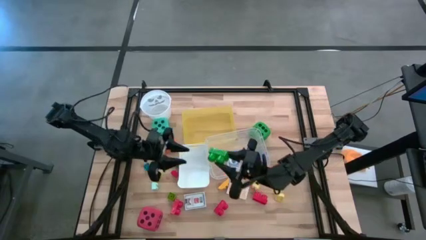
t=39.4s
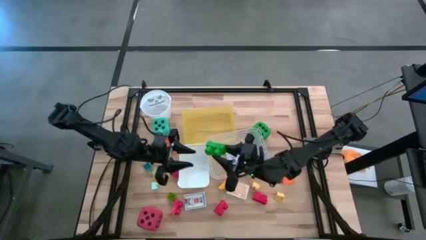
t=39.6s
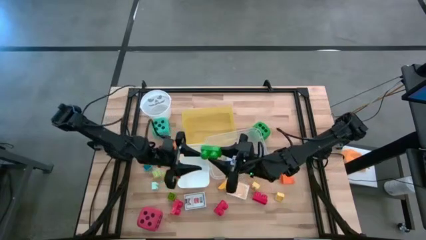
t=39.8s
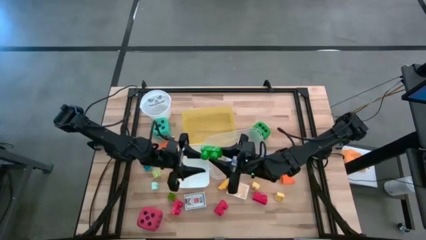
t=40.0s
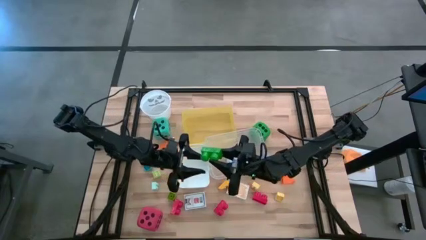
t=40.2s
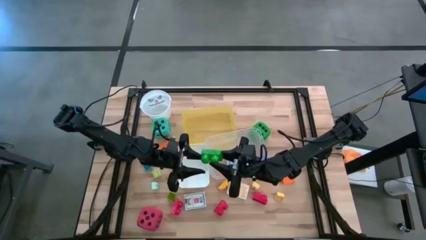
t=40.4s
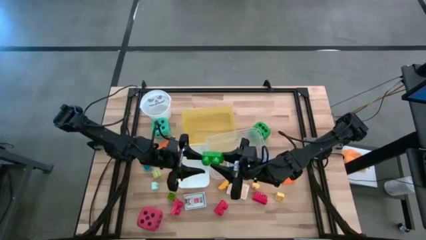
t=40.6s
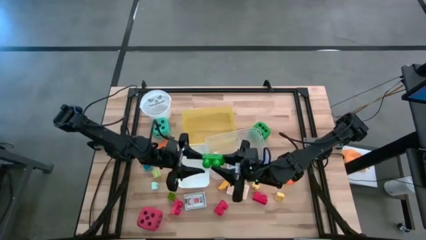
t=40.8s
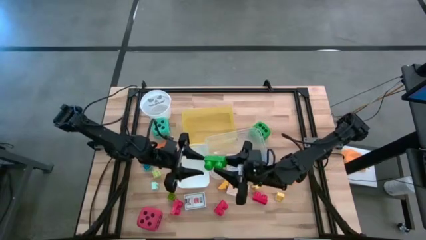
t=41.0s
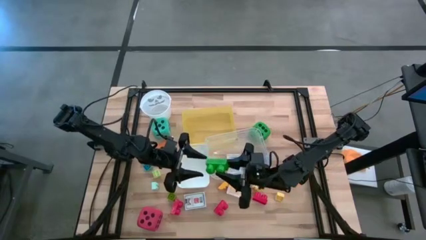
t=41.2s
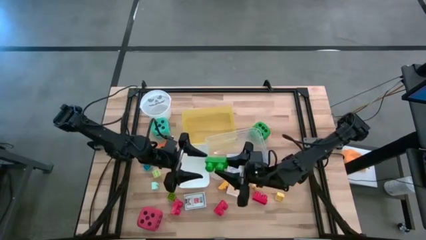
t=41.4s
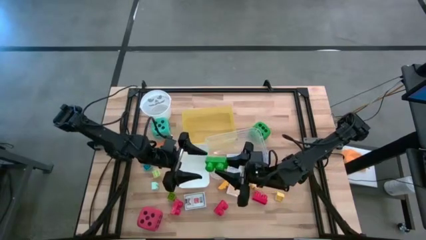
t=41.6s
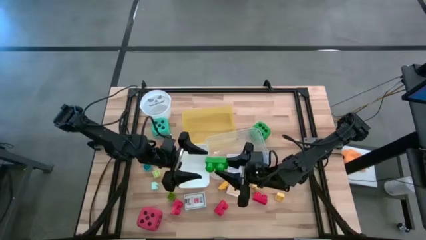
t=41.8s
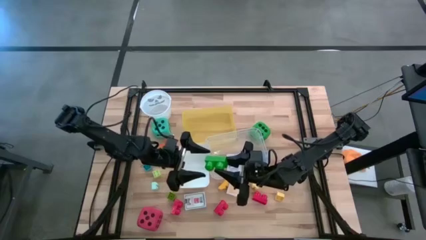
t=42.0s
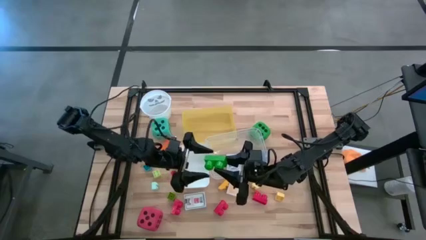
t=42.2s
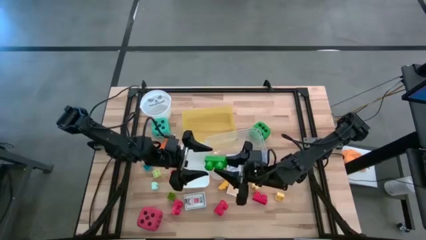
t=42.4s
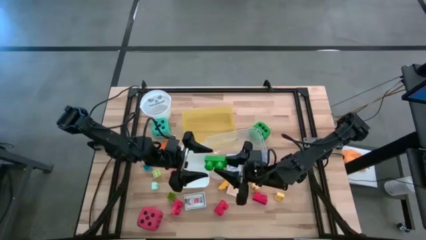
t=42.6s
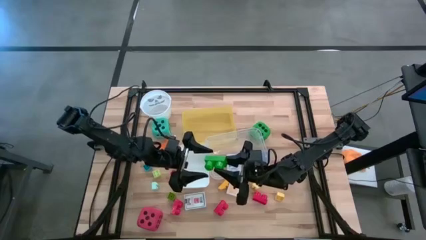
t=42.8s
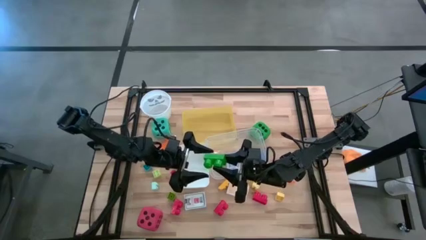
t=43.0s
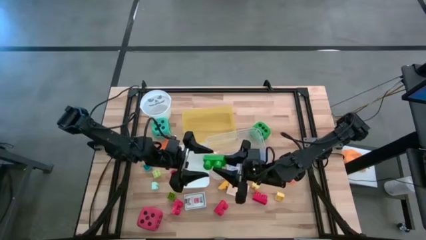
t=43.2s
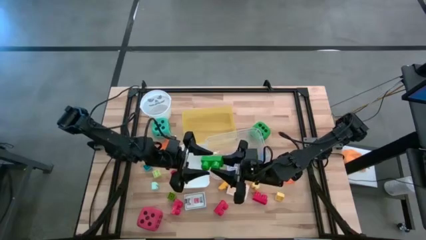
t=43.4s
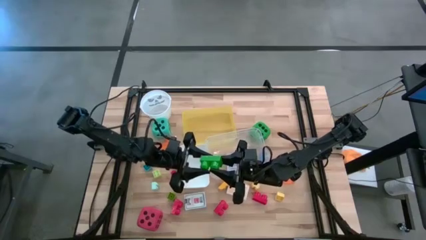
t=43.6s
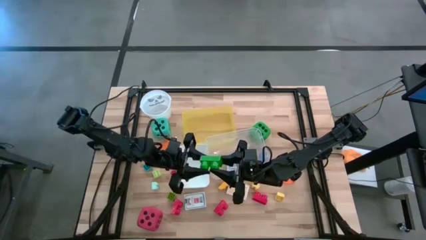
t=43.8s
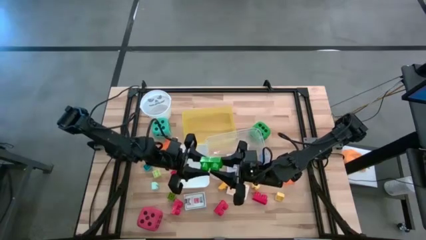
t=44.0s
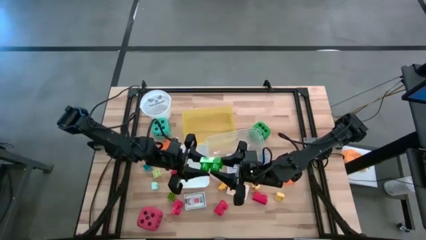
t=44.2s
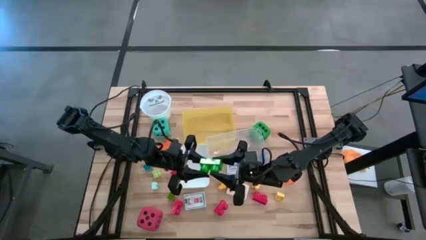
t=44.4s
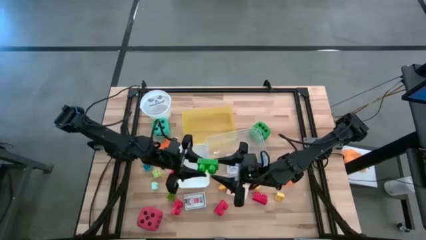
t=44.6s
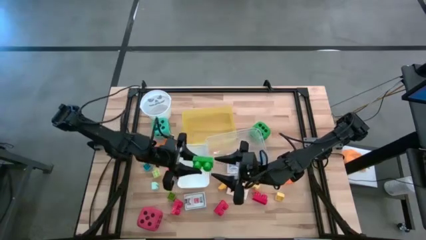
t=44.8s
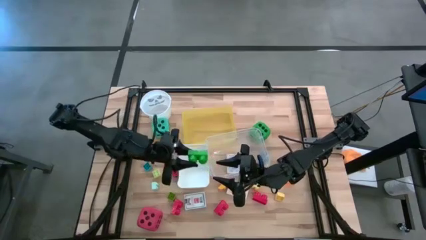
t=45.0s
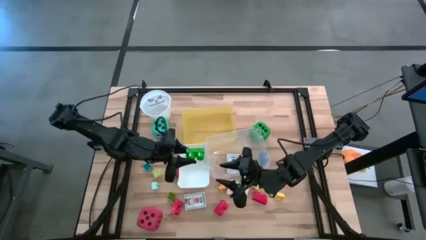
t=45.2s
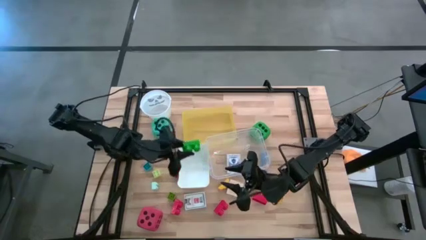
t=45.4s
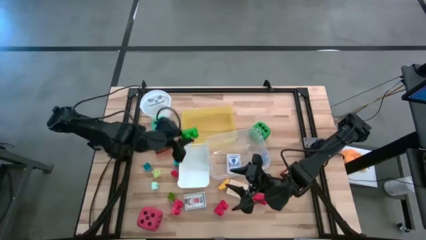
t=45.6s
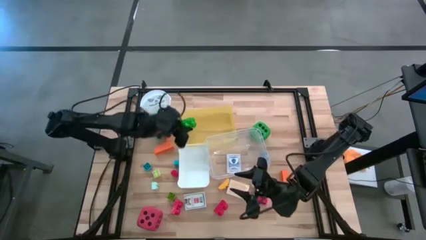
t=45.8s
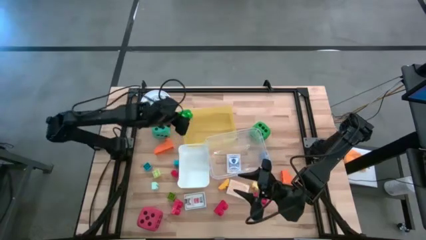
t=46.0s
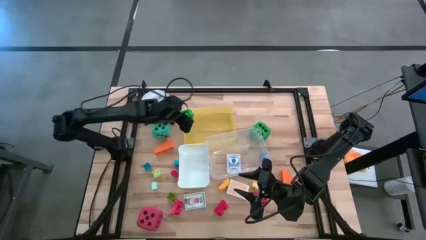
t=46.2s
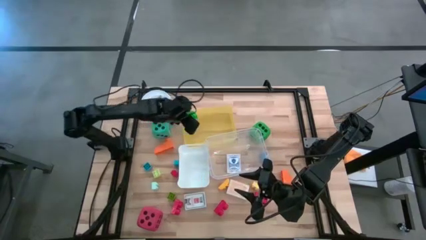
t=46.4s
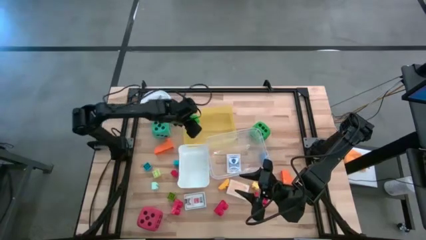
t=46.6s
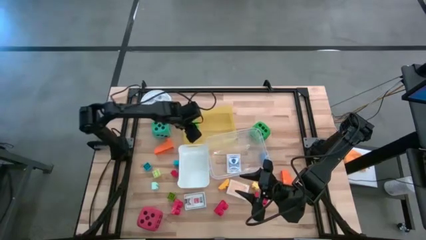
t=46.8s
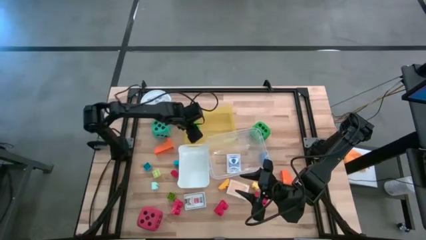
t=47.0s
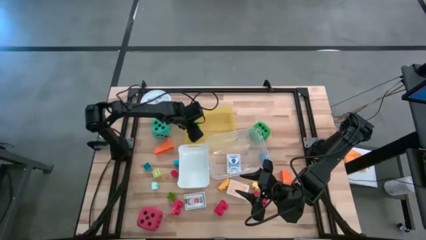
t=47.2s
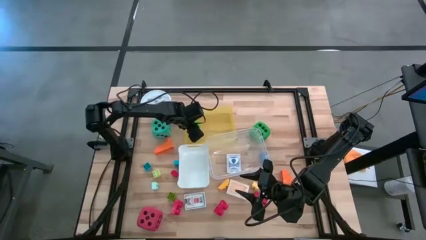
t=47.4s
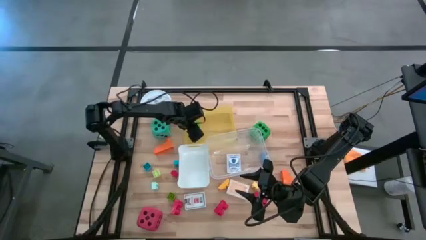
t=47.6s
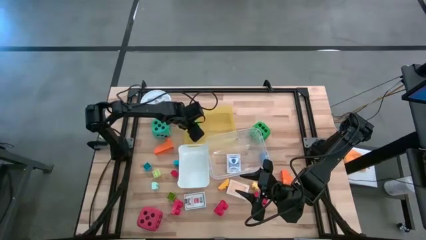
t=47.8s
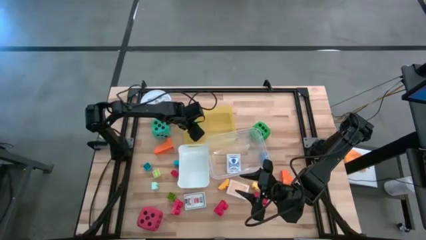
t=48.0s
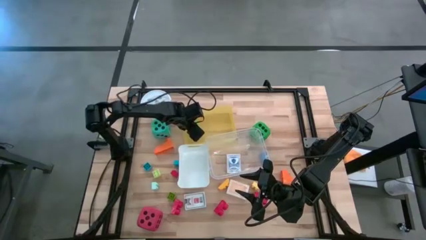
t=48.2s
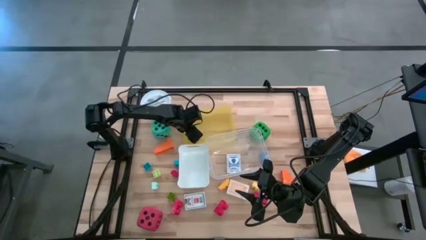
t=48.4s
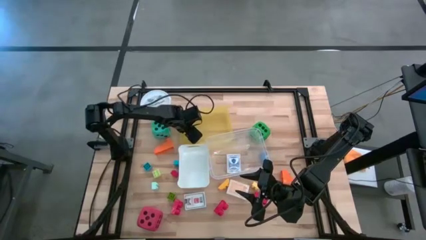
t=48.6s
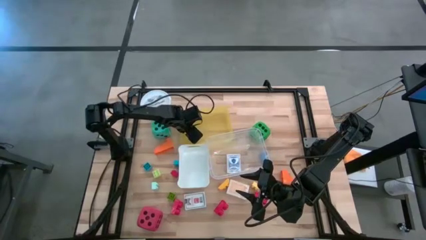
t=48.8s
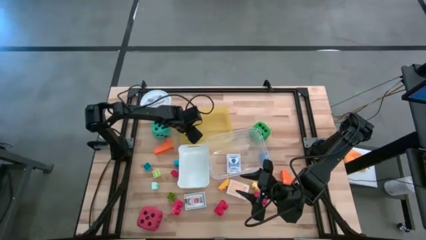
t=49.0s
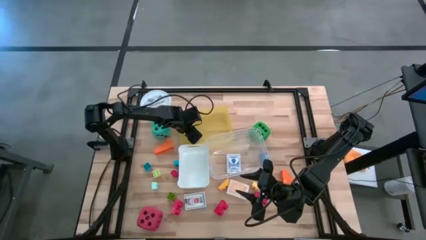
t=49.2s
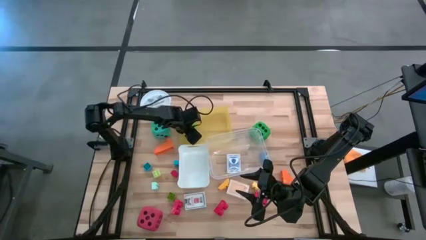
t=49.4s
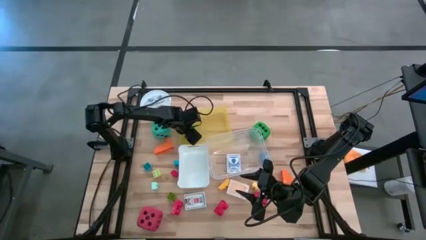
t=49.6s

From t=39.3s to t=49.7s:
Task: Pick & Place Toys
Put the green game piece into the yellow bin

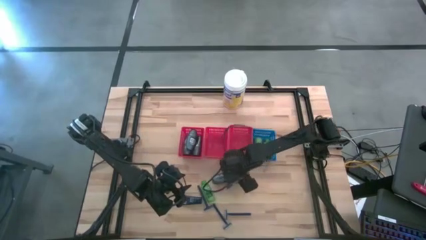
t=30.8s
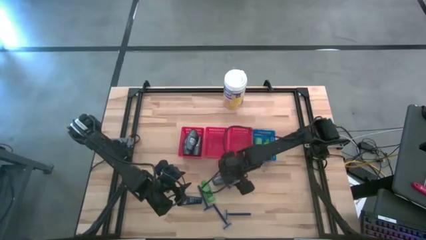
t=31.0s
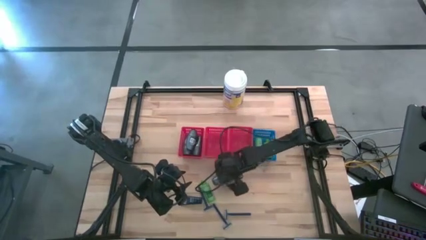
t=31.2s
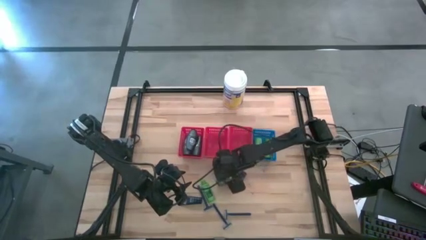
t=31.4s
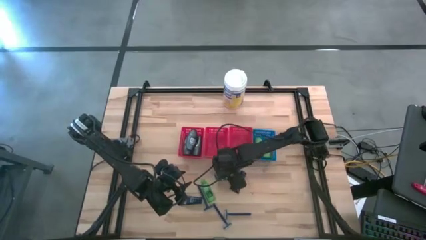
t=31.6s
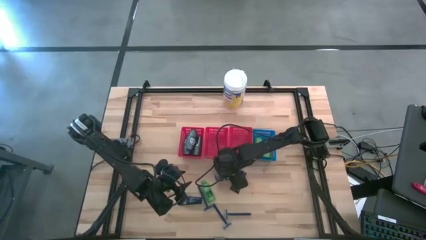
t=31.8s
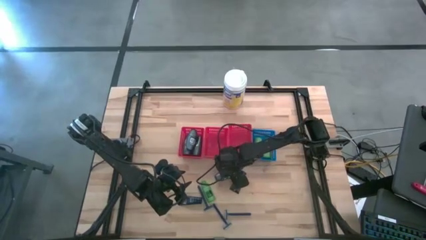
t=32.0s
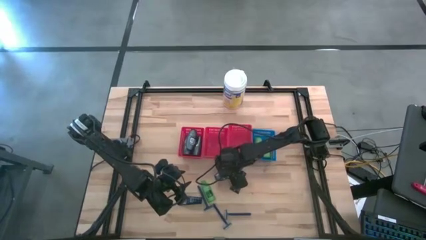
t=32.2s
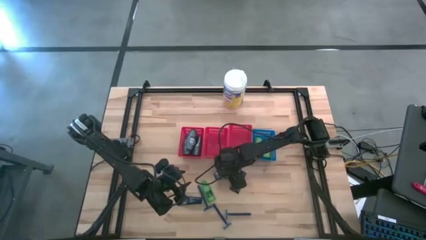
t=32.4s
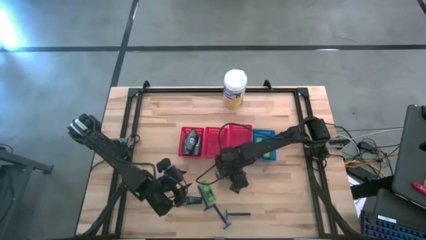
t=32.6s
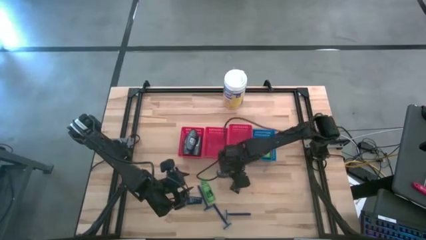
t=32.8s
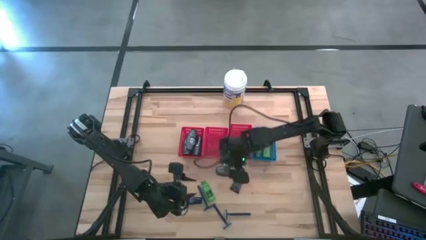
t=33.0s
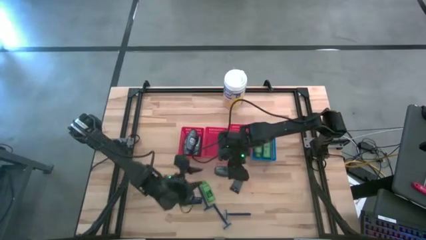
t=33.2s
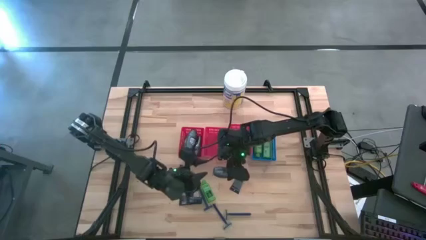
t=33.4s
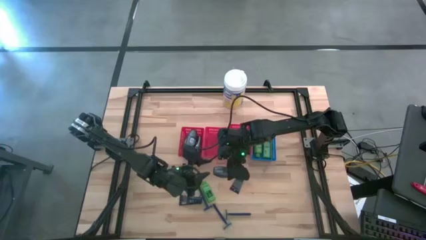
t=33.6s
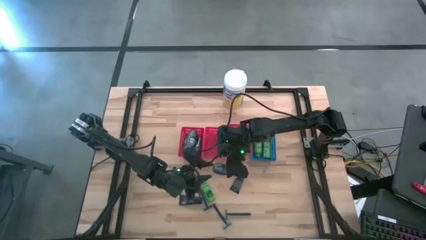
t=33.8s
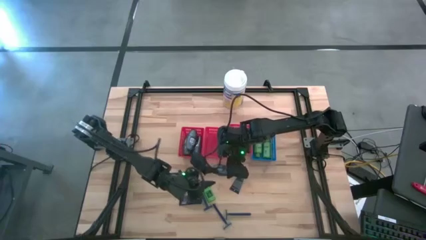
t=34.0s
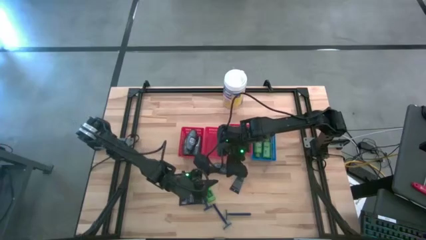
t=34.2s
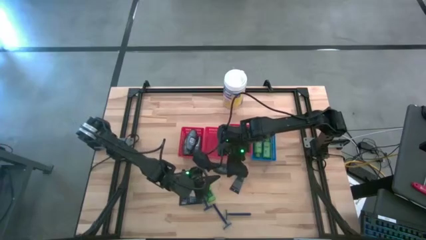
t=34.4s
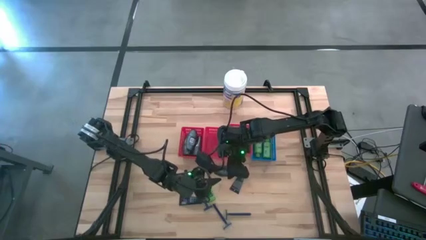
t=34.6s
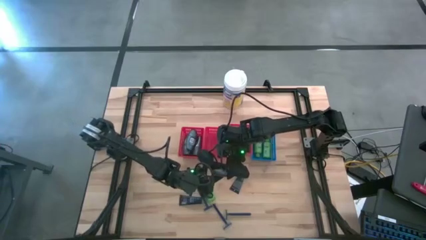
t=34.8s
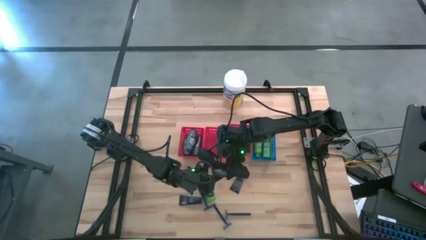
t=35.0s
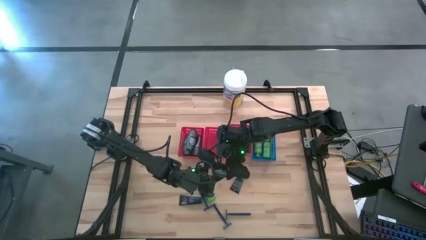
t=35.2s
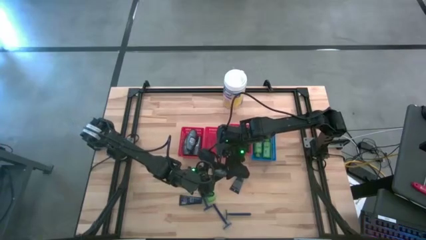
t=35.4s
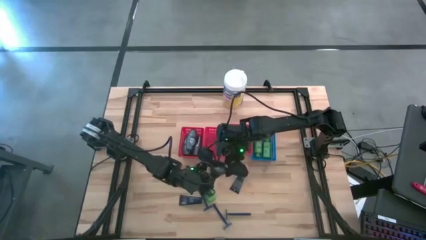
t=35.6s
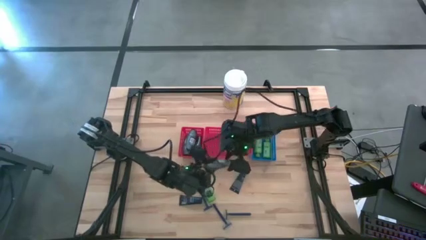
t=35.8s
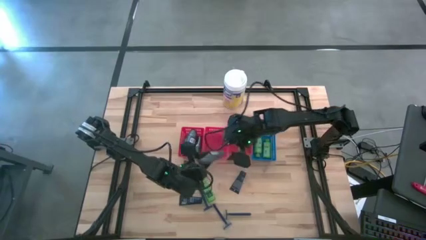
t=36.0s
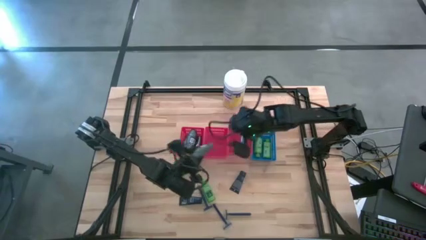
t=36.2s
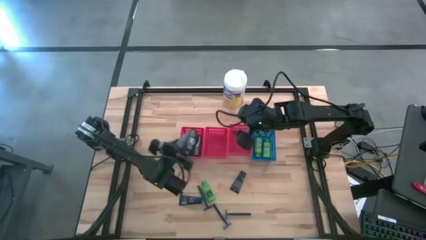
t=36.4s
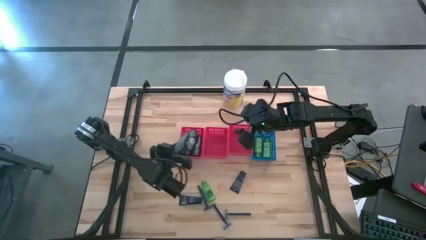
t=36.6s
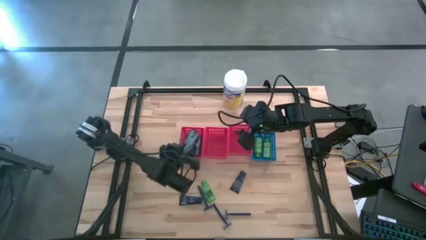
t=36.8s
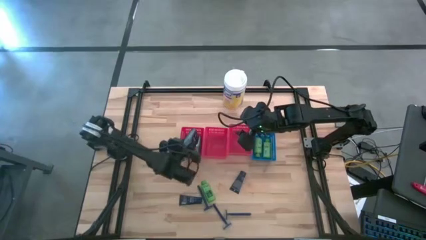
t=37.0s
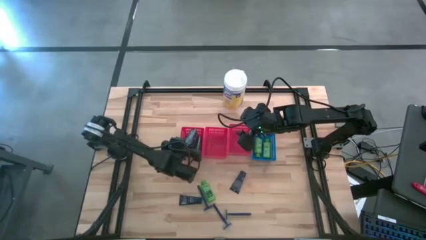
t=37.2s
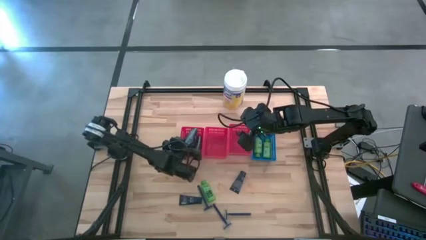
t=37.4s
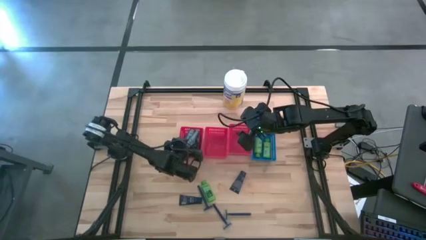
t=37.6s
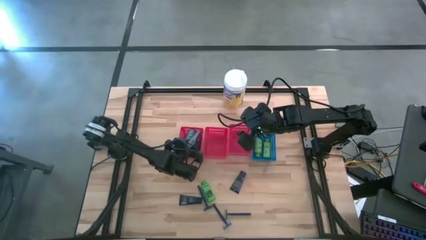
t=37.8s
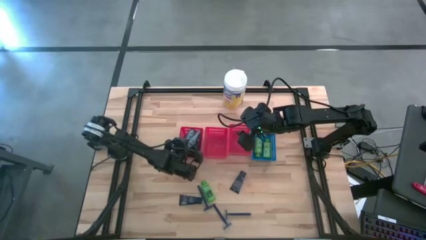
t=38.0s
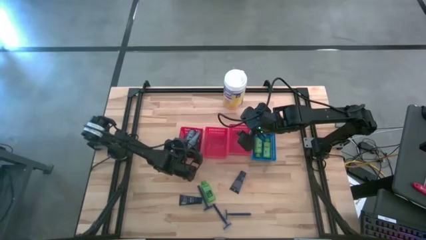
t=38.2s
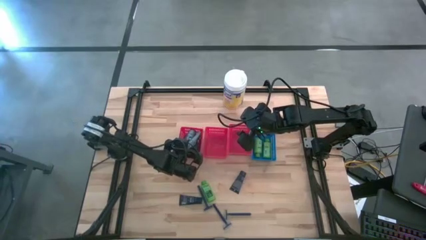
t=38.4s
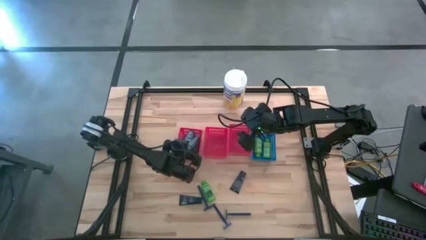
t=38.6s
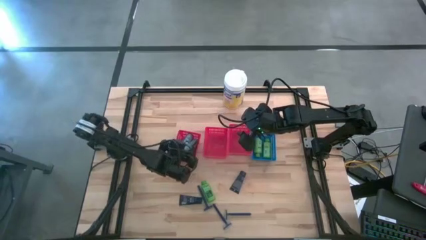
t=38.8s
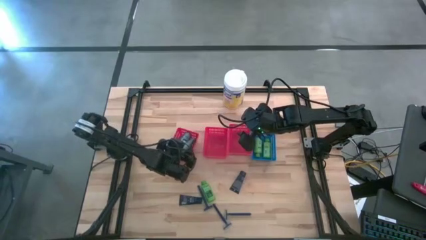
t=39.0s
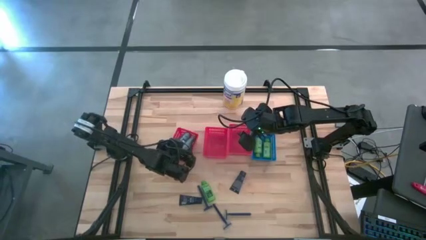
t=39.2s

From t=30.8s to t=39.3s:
Task: Pick & Place Travel size toiletries
Put the black deodorant into the left red bin
